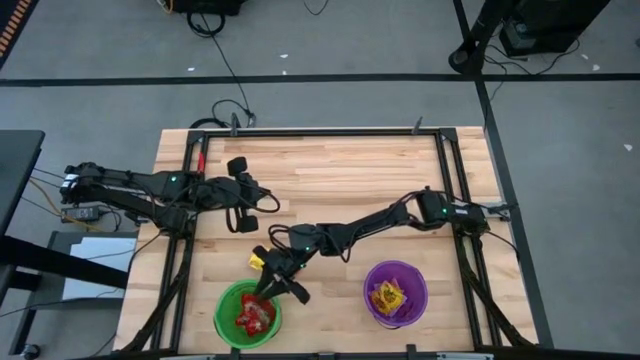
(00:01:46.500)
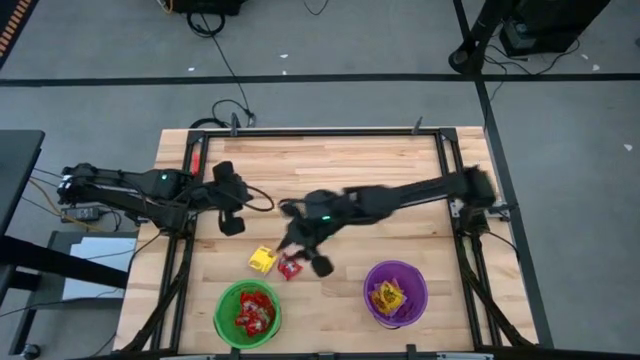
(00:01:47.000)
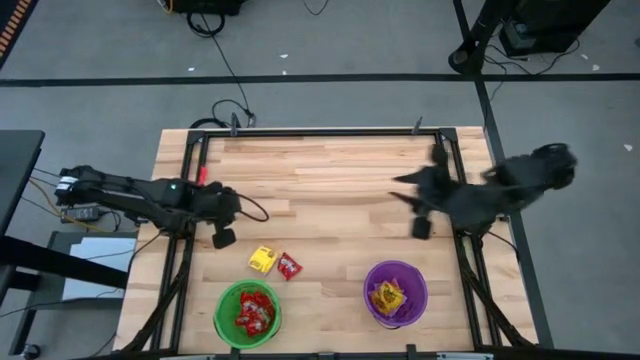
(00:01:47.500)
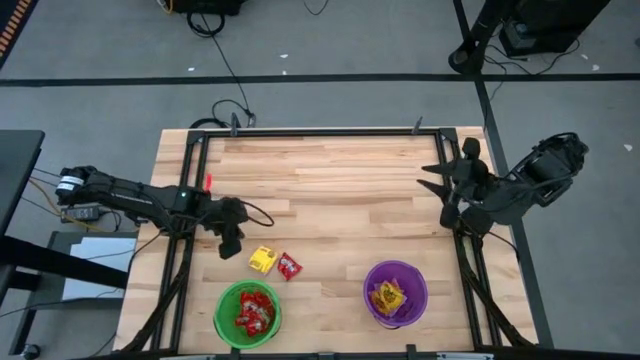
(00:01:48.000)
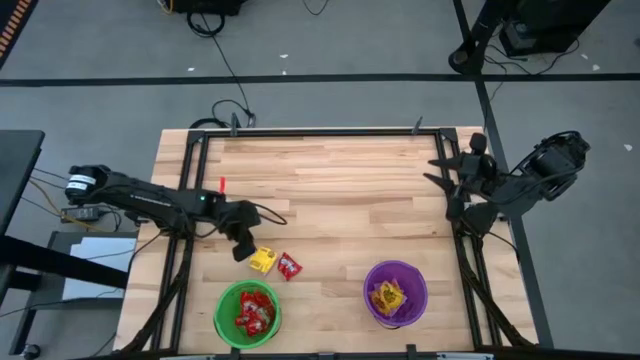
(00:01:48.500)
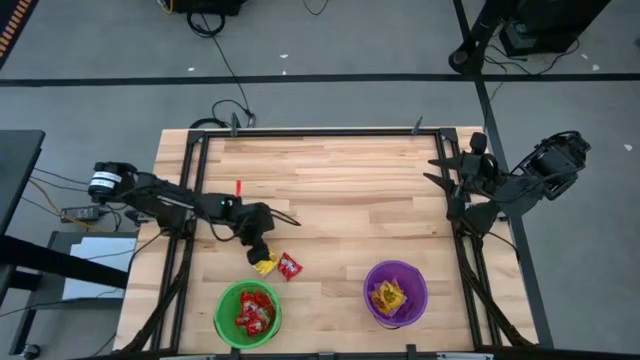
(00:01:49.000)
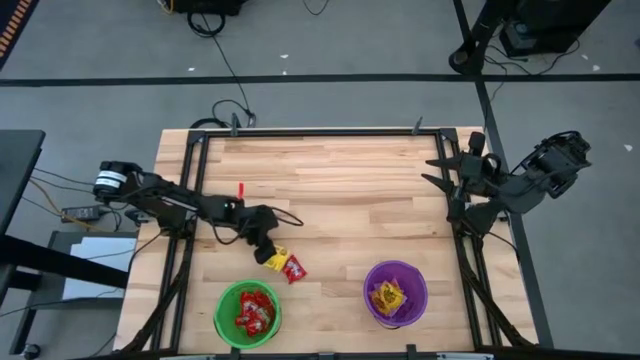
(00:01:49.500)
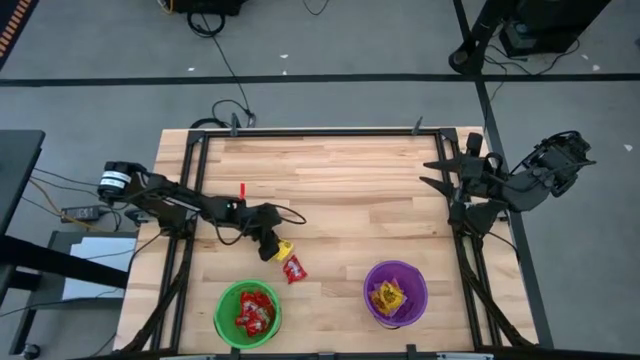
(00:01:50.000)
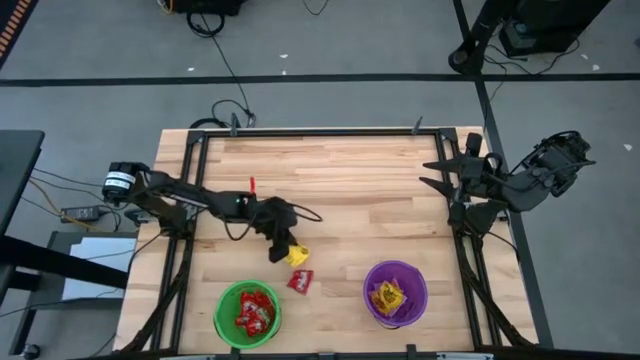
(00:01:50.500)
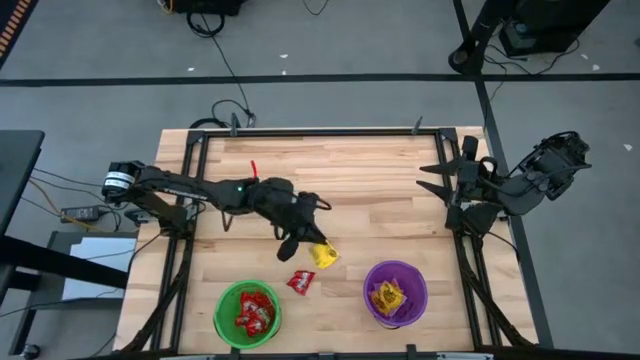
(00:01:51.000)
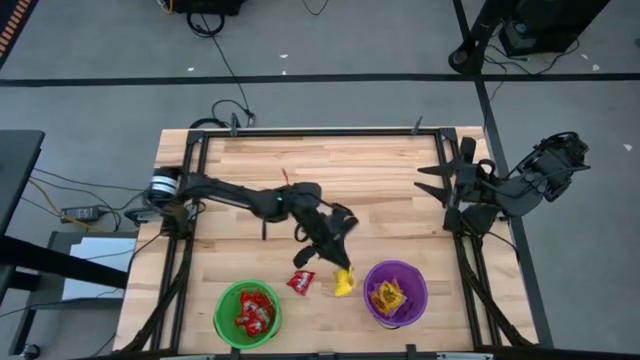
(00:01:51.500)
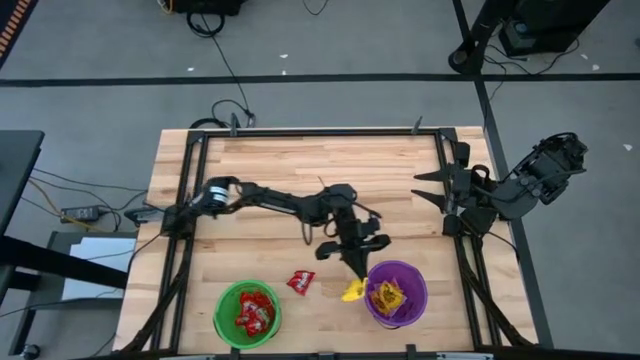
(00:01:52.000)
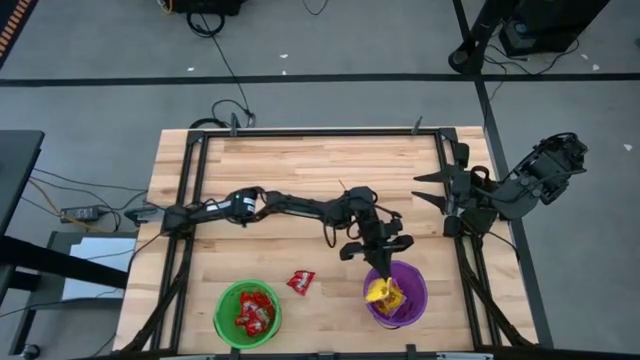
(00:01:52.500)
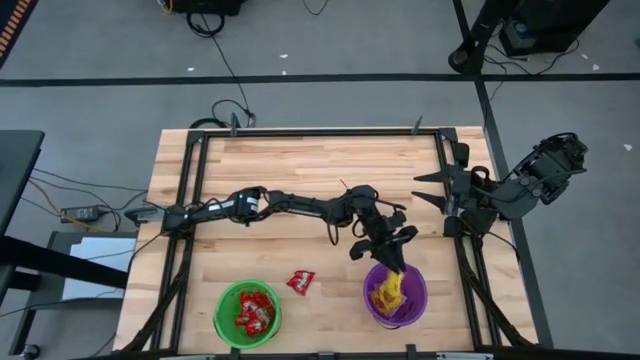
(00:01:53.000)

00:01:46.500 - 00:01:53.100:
Task: Sort candy by brand, put in halloween buckets
Put the yellow candy into the purple bucket

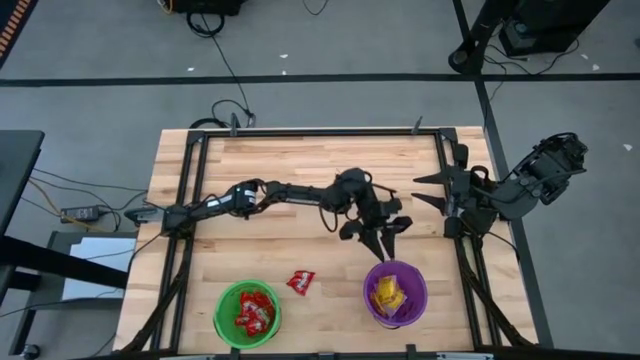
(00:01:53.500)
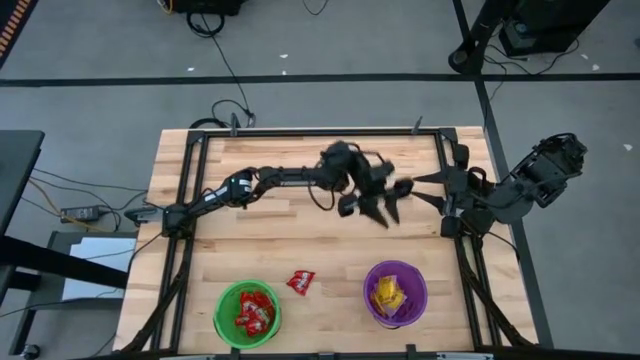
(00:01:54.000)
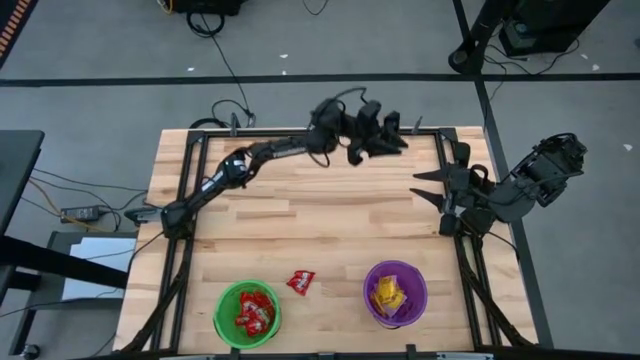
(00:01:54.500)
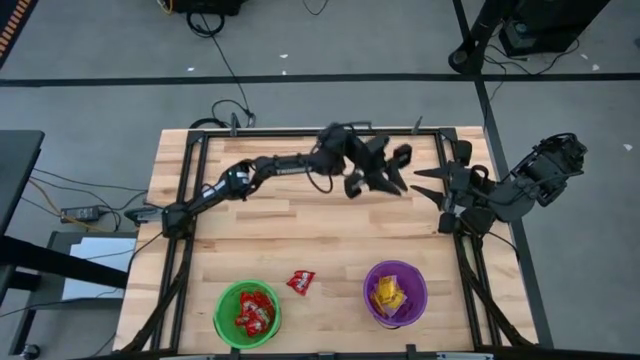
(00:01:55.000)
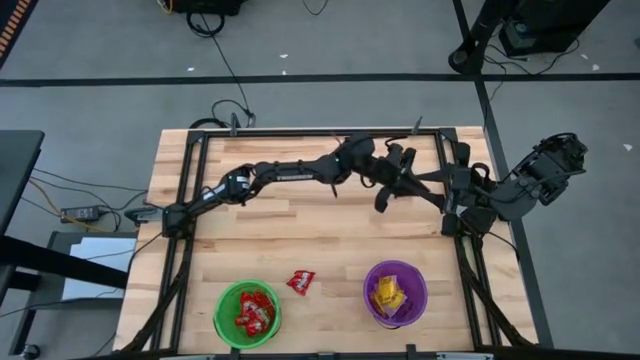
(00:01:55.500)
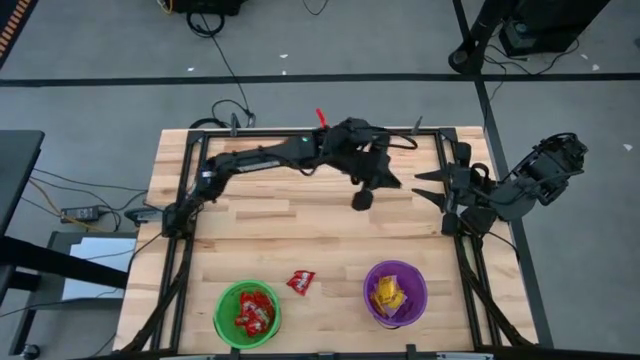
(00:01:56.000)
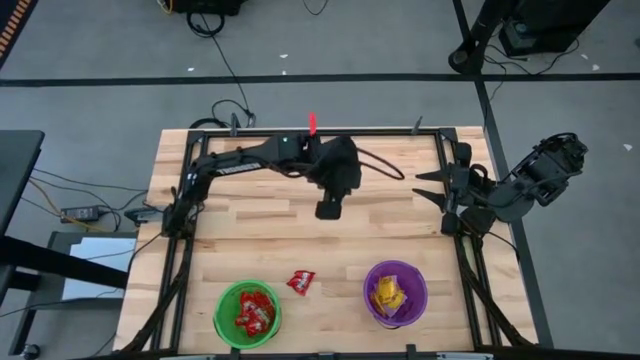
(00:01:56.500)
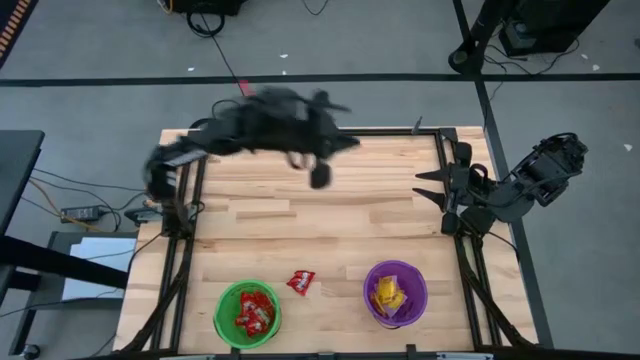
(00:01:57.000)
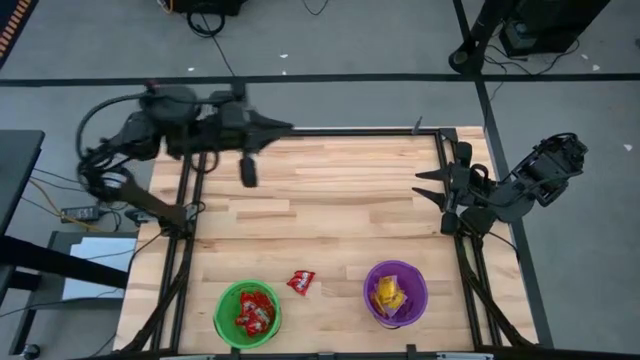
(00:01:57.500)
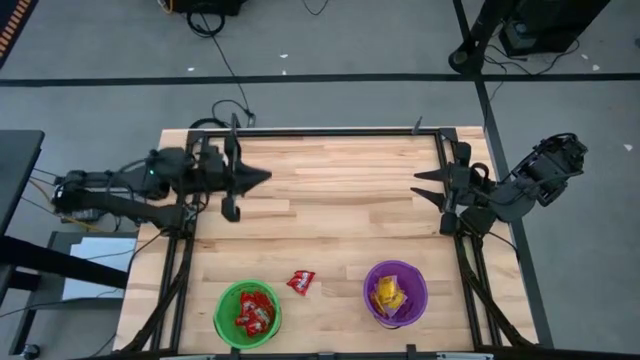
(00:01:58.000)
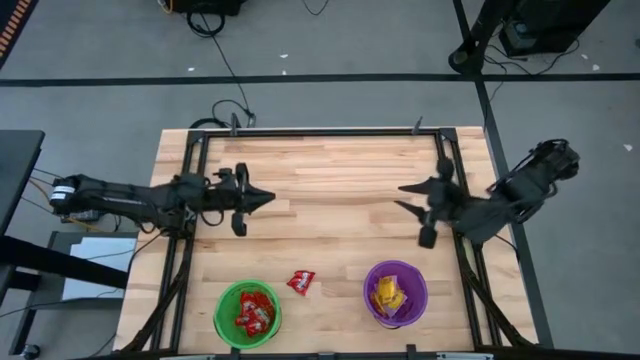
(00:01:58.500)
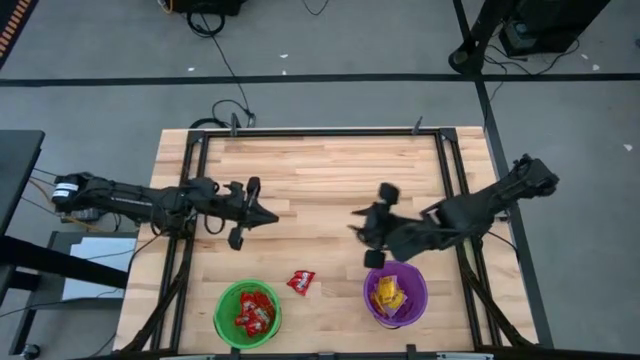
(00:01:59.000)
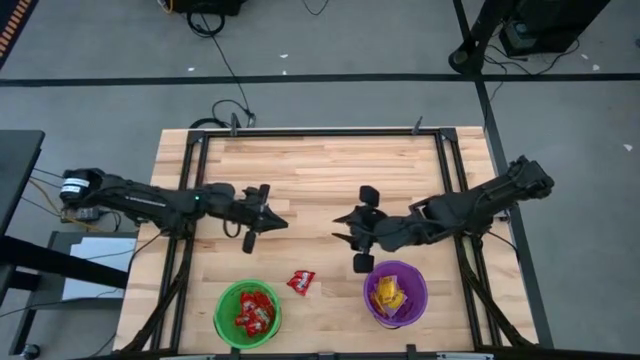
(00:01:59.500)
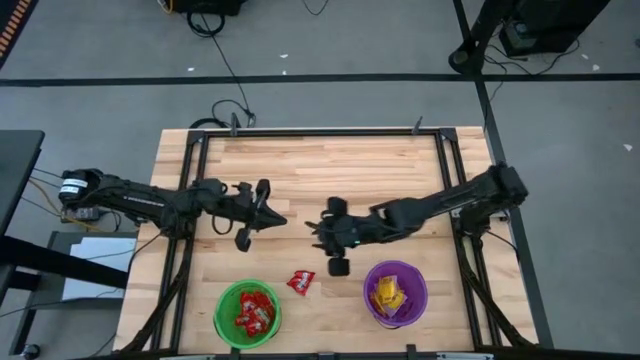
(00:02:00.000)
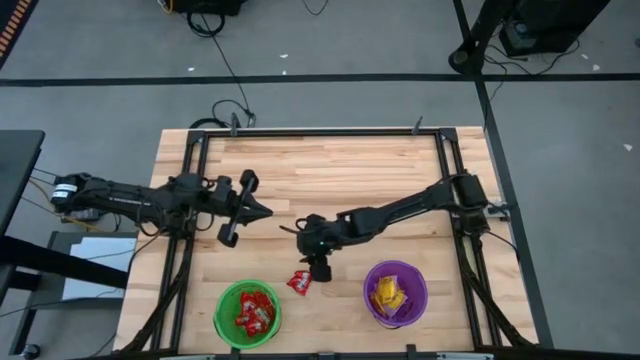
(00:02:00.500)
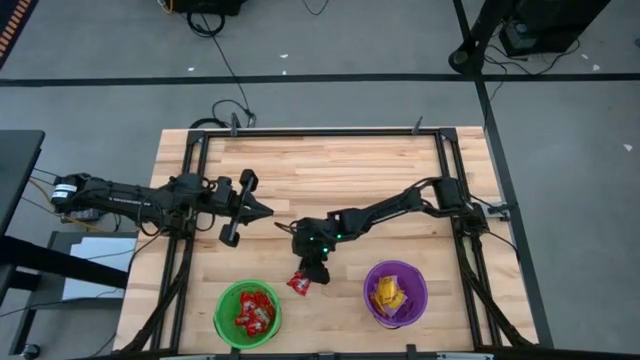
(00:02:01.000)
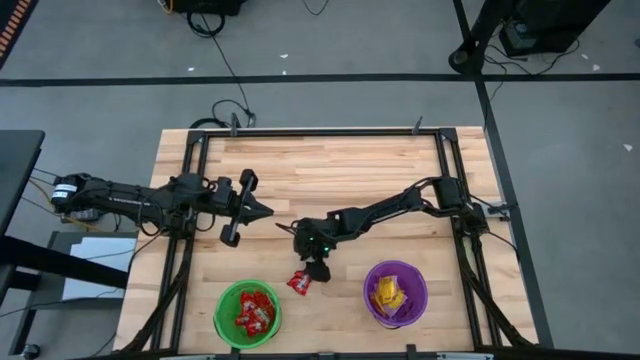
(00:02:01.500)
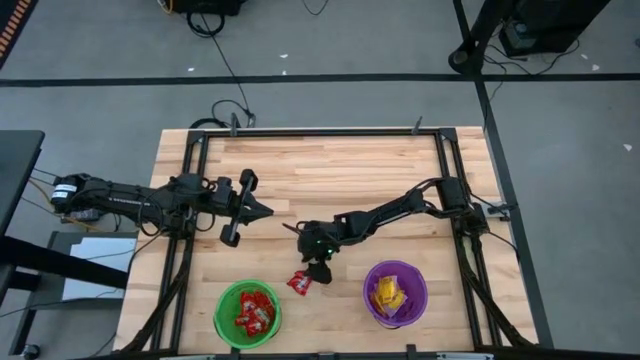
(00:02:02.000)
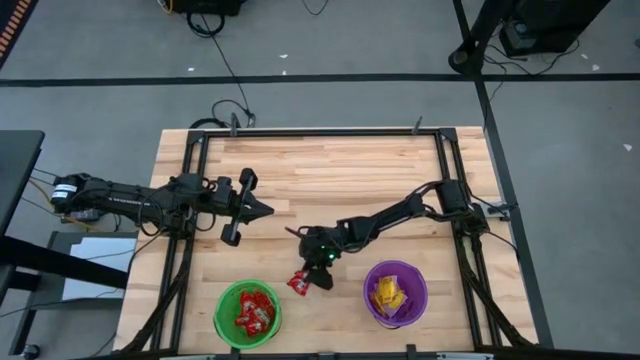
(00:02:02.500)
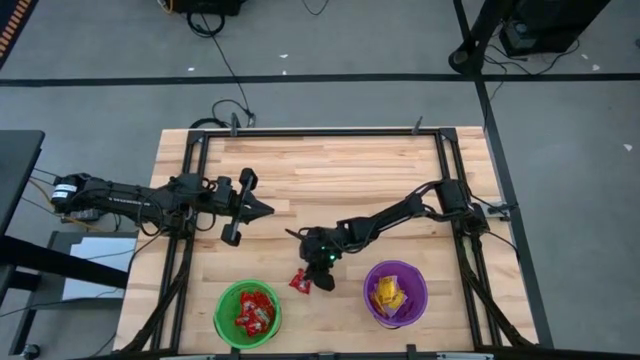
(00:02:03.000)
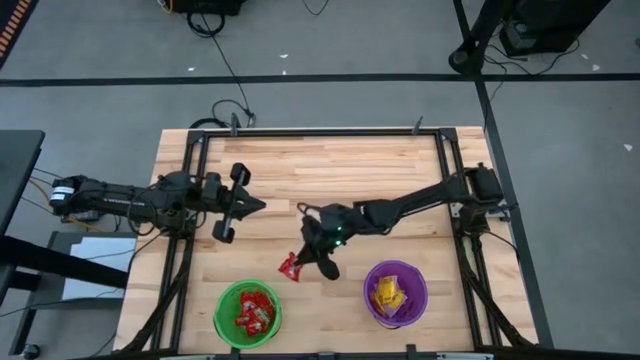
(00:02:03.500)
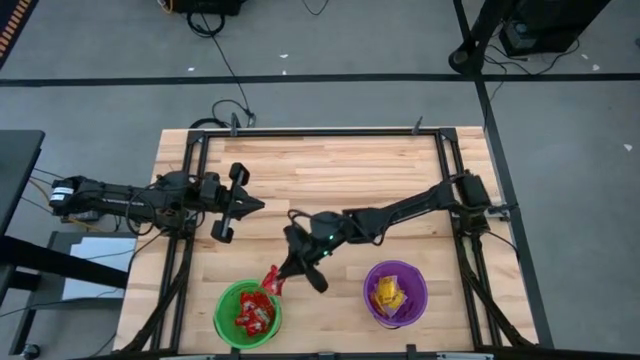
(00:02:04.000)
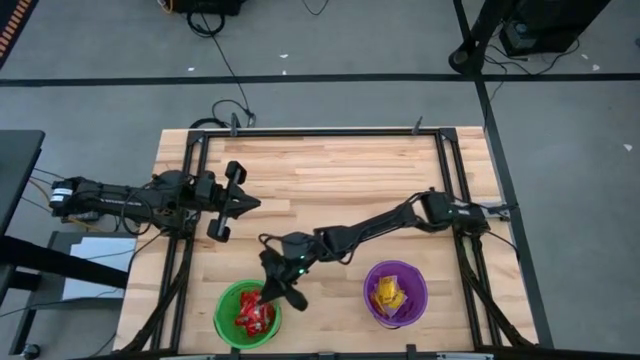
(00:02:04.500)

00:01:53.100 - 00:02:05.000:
Put the red candy into the green bucket

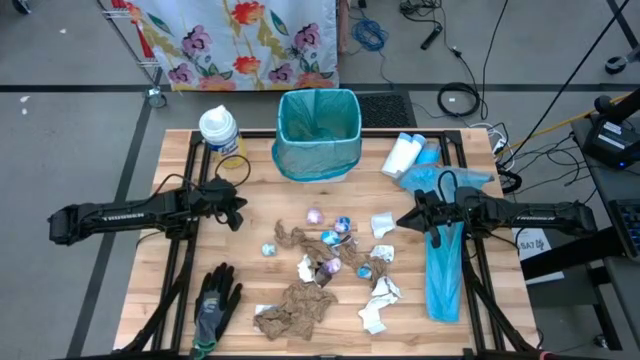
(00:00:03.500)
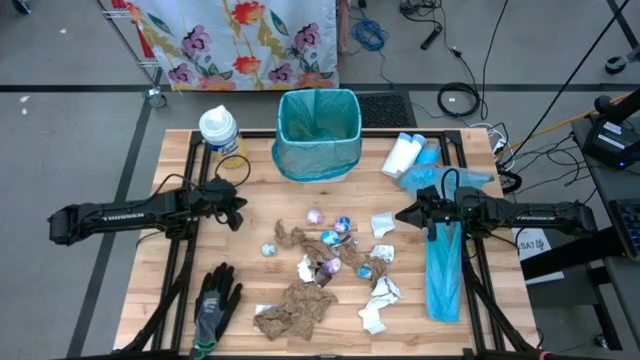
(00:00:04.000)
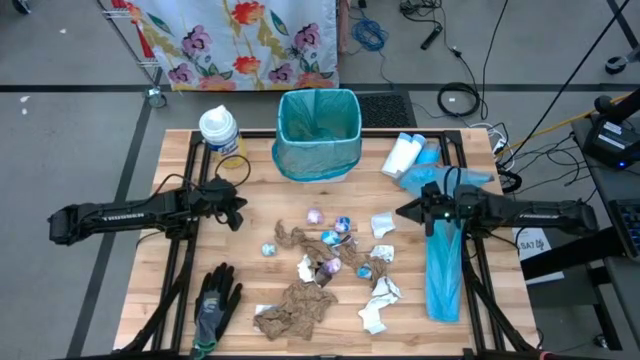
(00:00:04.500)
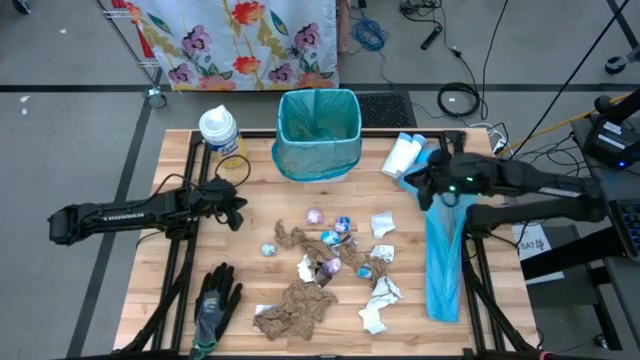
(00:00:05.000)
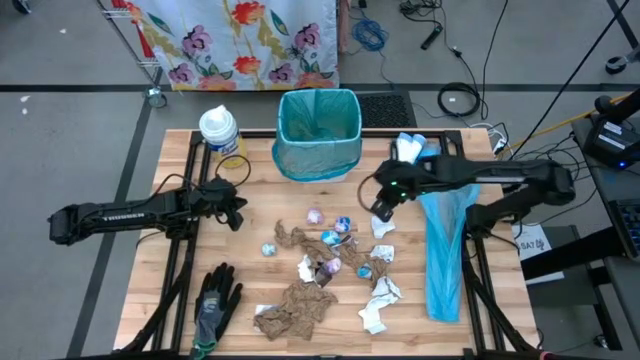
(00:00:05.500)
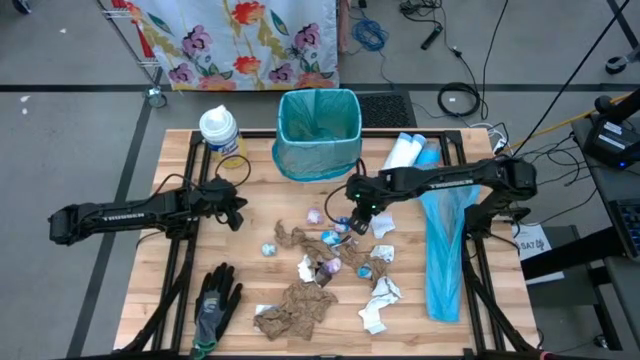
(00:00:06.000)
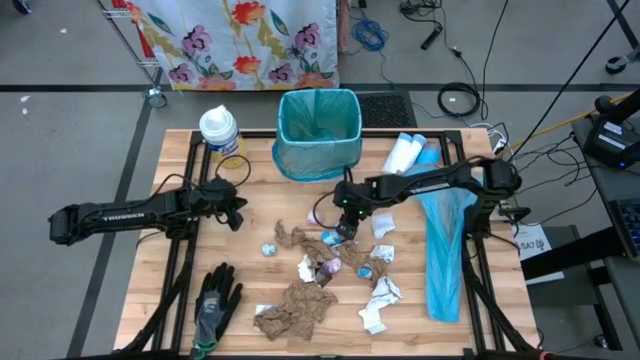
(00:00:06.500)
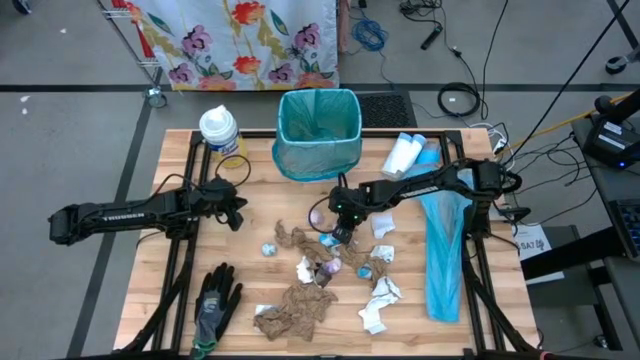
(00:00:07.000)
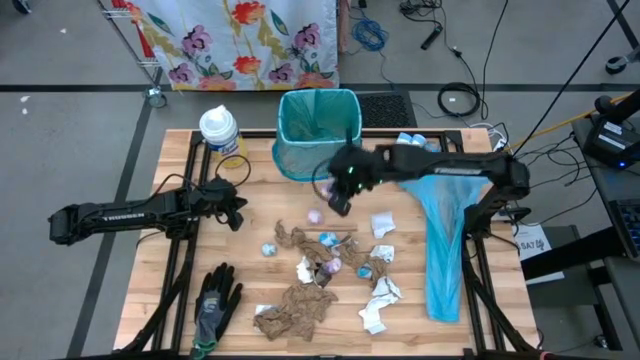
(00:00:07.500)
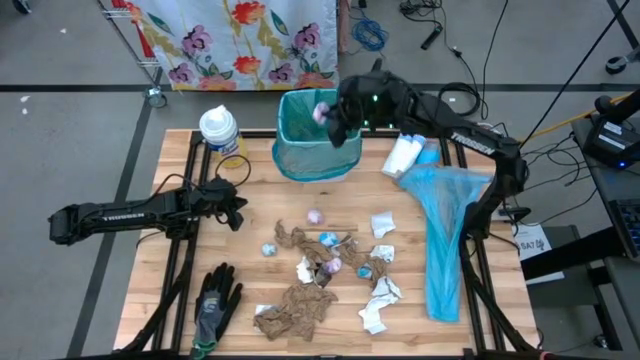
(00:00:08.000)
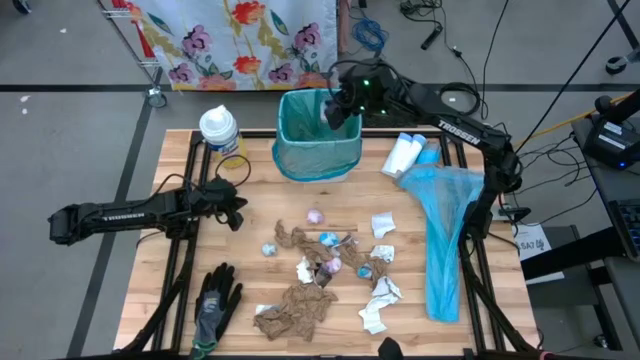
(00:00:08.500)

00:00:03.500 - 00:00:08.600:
Task: place trash/remove bag and relplace
Put the blue-pink bag into the white trash bin
